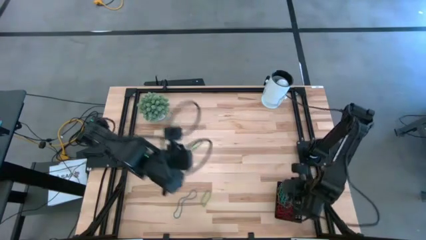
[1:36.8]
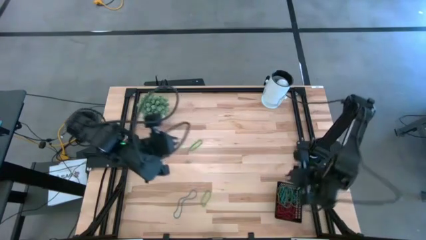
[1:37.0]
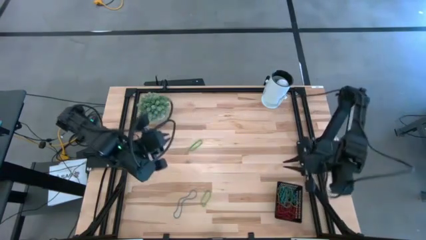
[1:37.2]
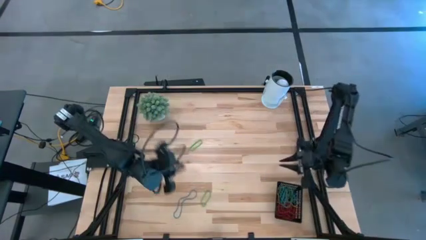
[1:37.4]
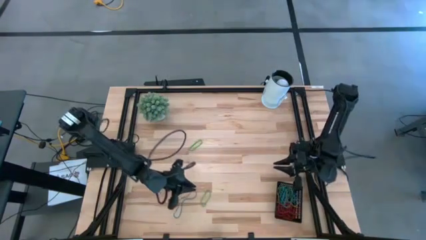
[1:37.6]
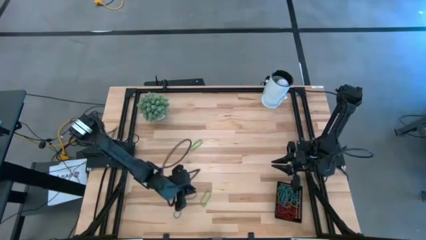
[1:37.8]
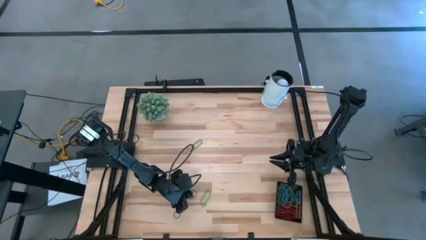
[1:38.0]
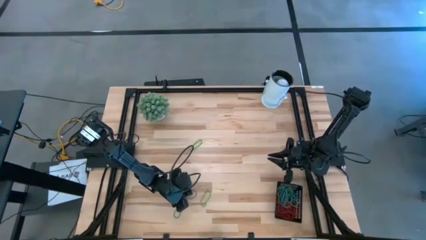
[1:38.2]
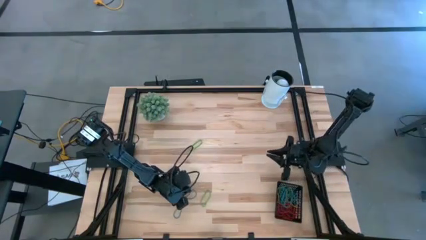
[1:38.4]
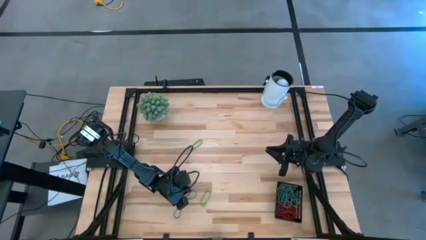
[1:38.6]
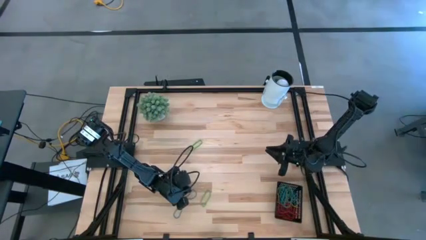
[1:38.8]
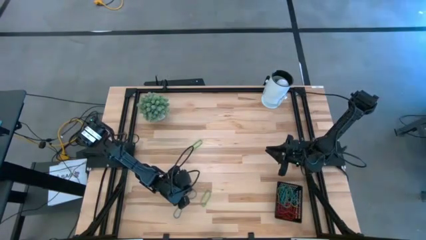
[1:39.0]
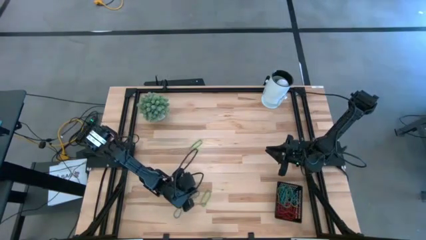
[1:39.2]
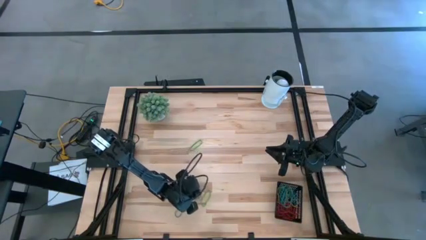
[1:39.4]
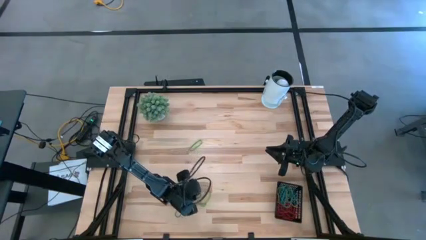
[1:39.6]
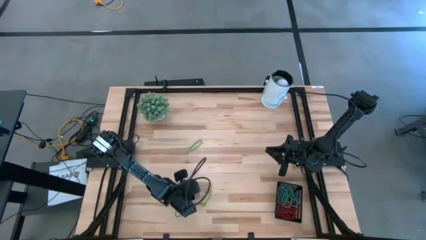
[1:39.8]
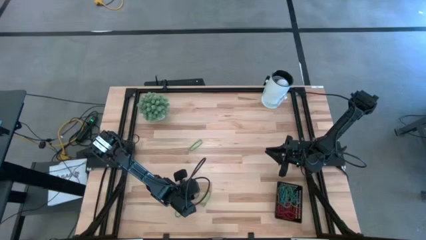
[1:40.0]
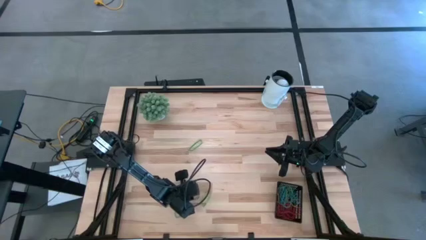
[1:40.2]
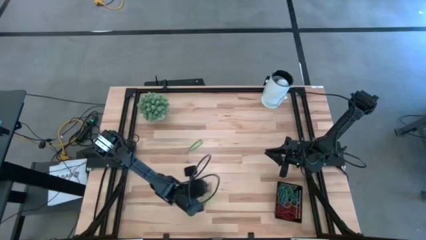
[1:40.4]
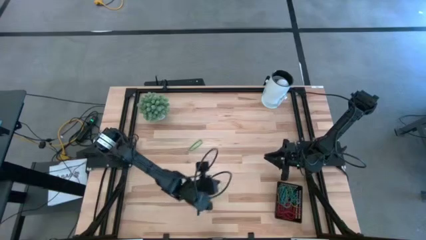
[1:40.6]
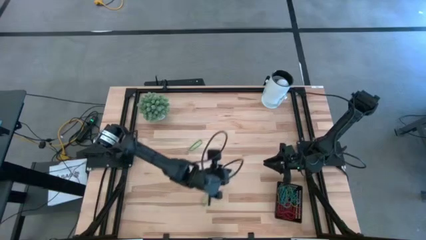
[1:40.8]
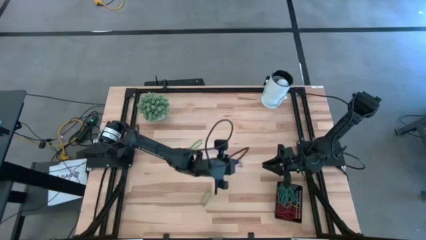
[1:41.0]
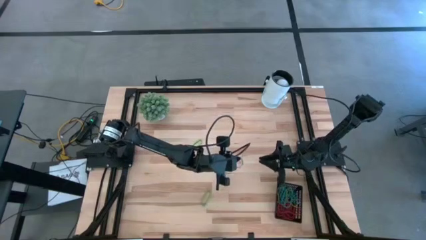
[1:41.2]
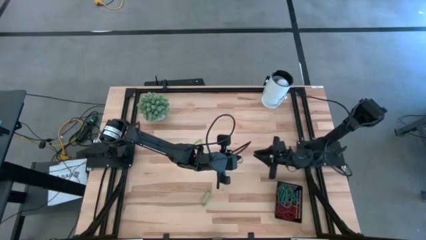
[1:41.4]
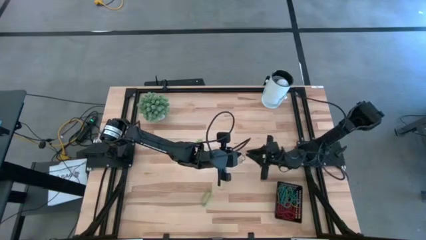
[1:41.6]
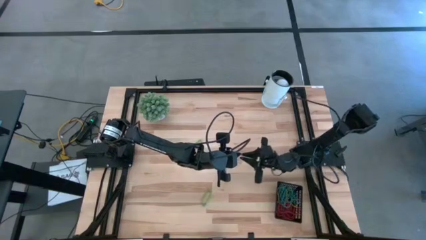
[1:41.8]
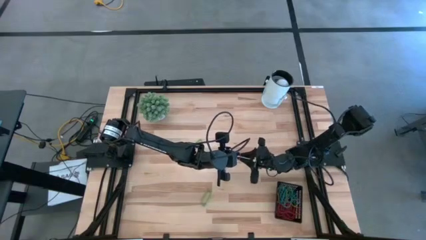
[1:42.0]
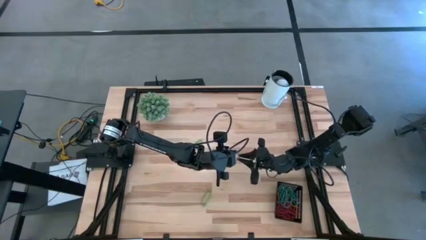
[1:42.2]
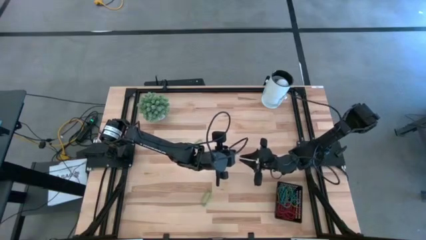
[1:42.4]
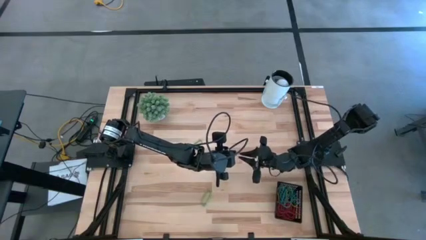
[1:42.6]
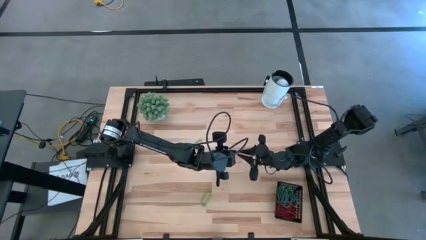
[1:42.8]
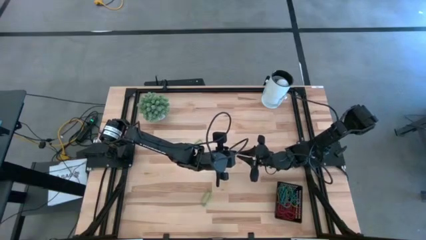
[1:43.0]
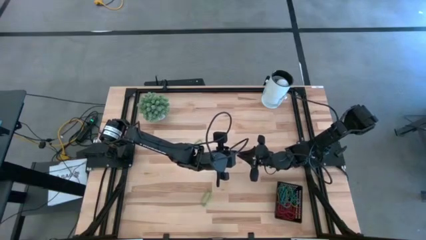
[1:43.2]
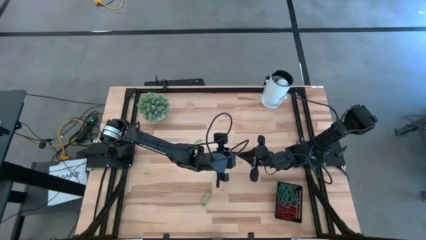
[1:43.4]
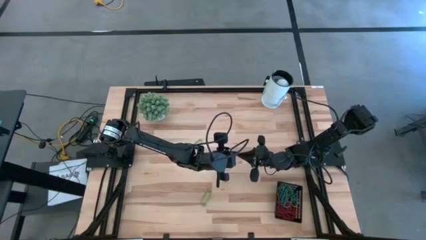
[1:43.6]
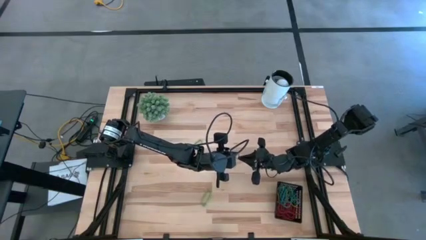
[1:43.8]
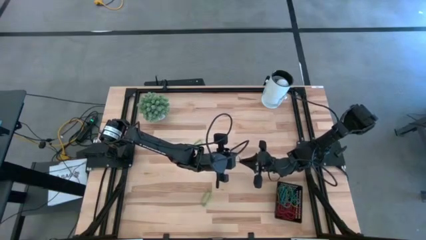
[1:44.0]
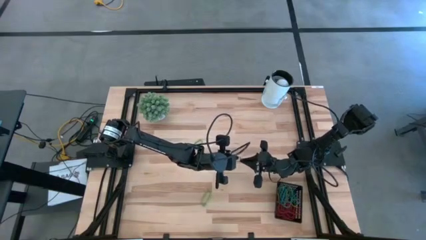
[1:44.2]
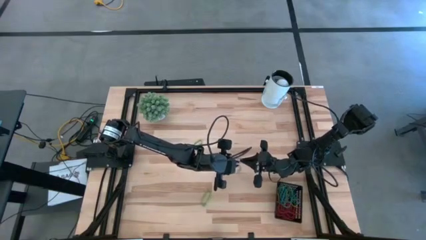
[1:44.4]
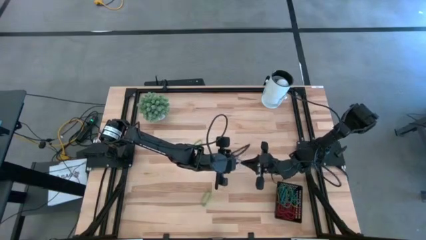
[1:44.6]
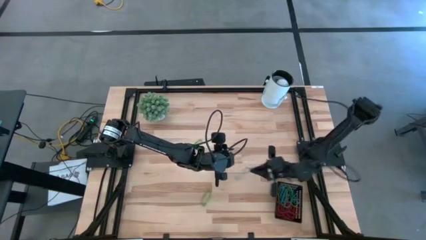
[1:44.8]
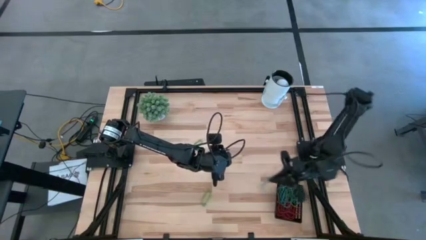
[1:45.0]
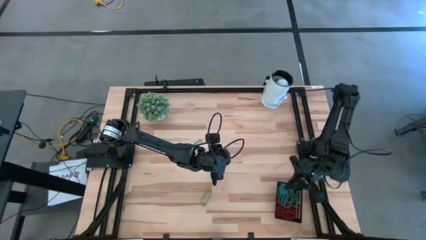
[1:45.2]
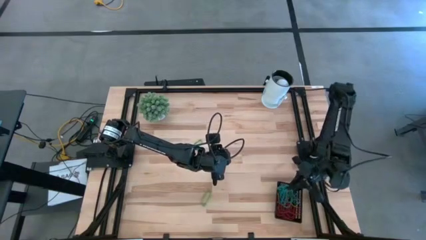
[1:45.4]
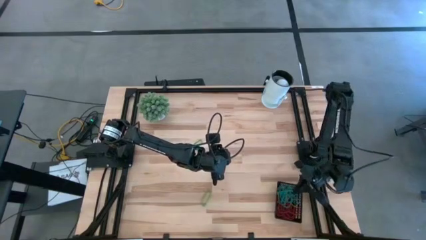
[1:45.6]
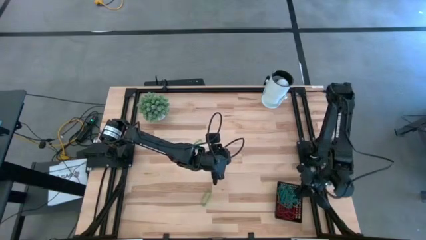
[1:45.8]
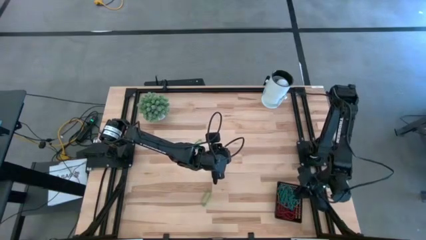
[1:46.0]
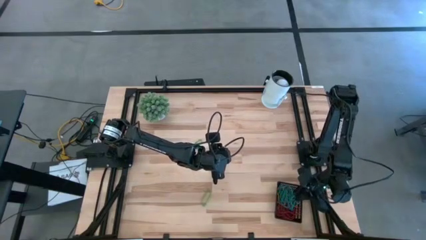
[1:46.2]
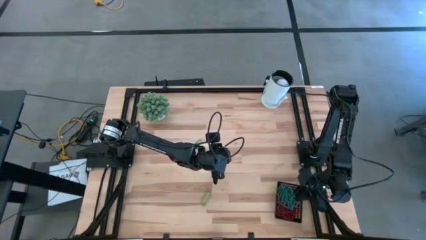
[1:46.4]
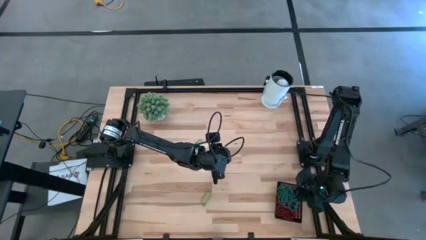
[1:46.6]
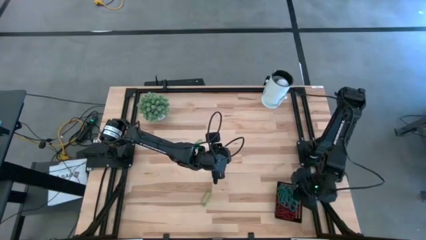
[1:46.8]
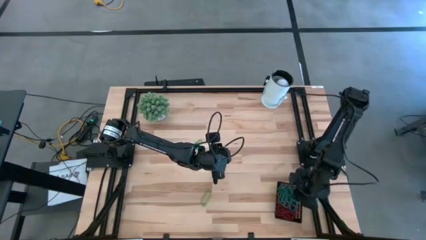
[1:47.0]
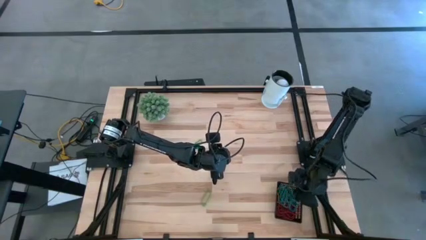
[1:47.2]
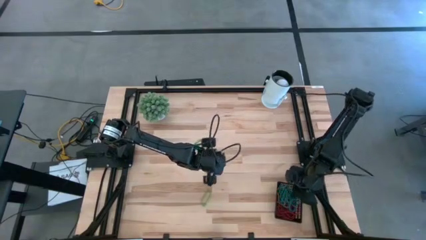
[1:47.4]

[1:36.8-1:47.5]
Task: Pick and place items into bin
Put the blue rubberband into the black basket

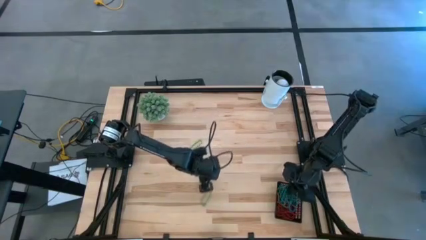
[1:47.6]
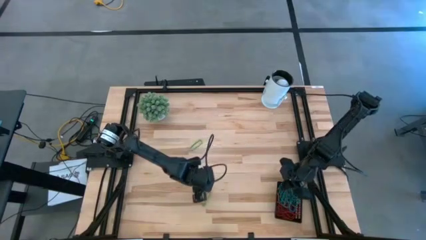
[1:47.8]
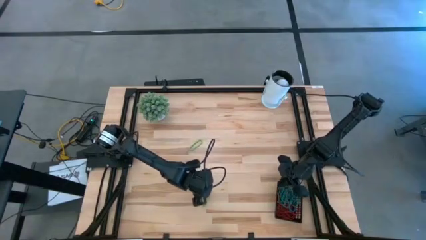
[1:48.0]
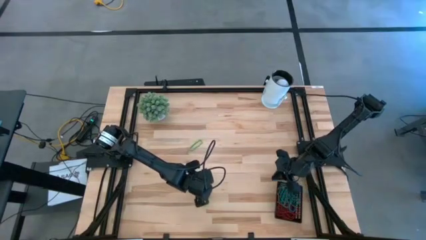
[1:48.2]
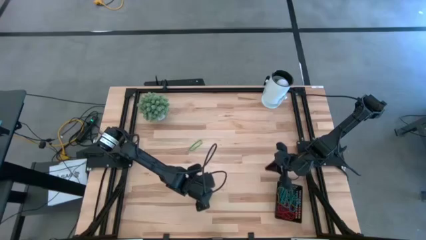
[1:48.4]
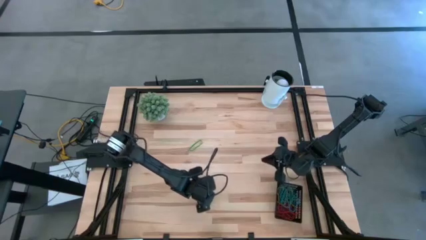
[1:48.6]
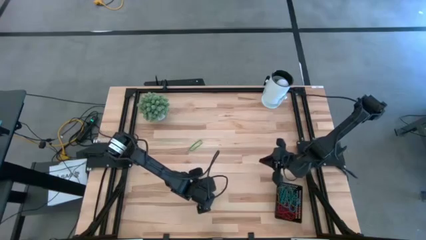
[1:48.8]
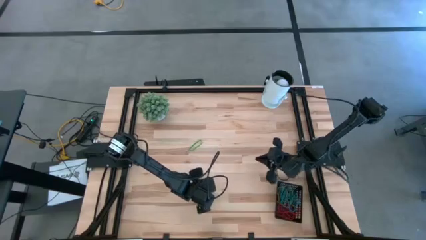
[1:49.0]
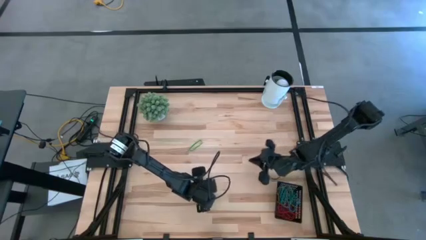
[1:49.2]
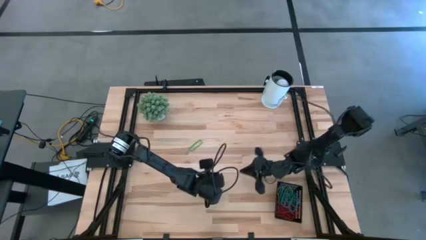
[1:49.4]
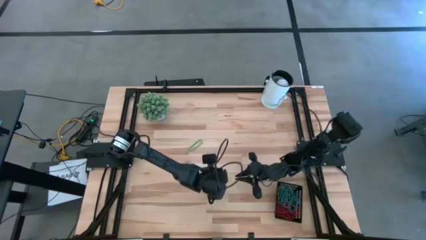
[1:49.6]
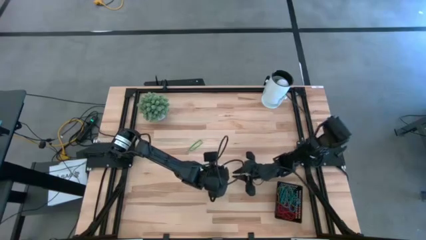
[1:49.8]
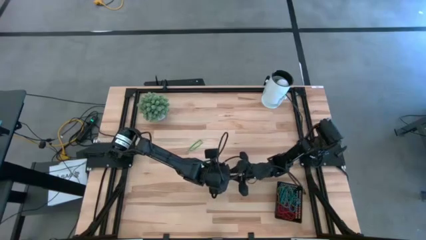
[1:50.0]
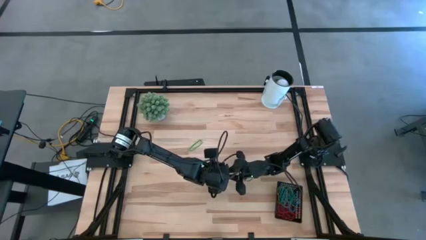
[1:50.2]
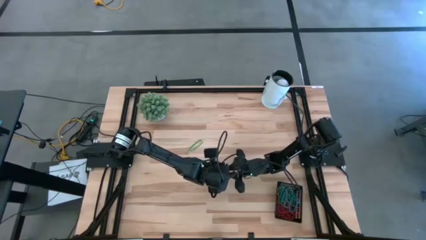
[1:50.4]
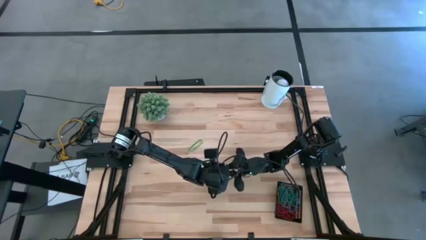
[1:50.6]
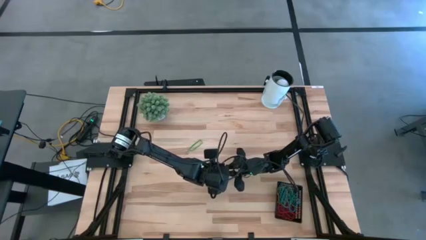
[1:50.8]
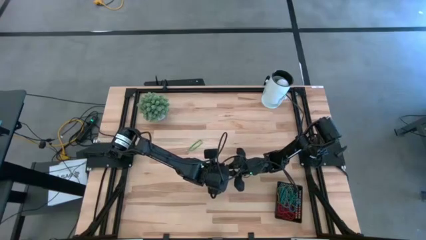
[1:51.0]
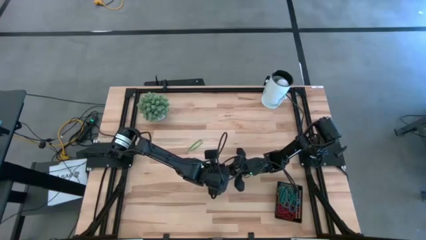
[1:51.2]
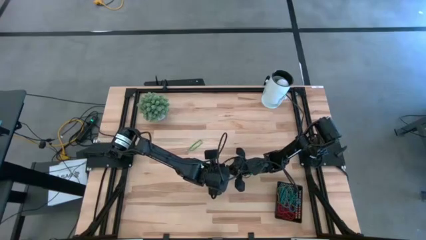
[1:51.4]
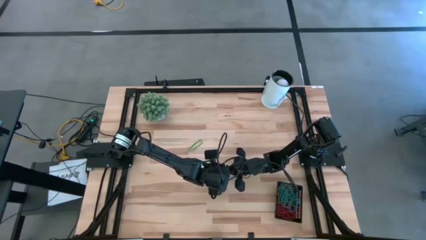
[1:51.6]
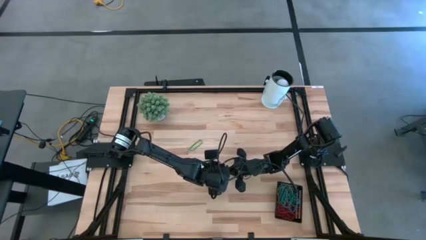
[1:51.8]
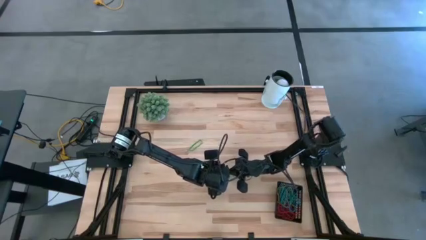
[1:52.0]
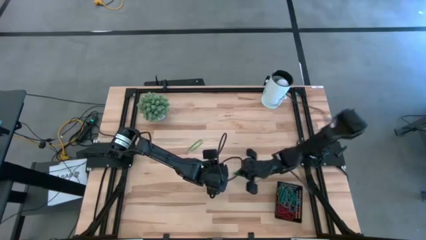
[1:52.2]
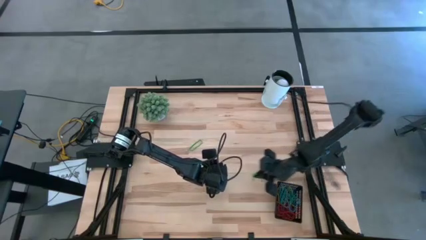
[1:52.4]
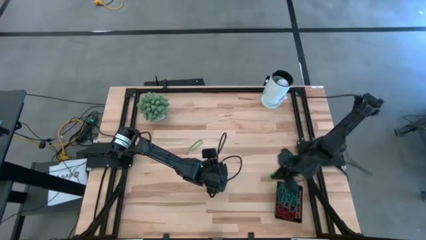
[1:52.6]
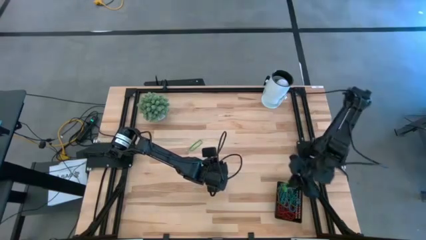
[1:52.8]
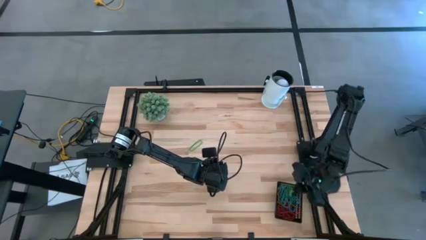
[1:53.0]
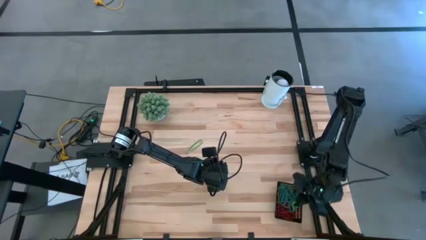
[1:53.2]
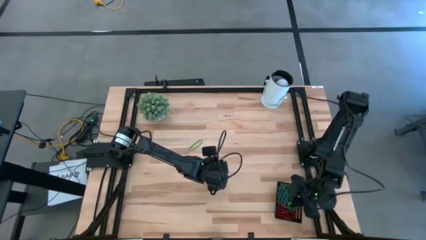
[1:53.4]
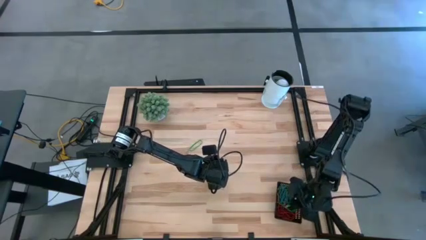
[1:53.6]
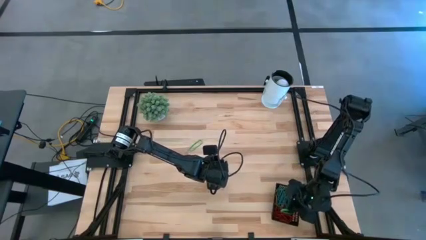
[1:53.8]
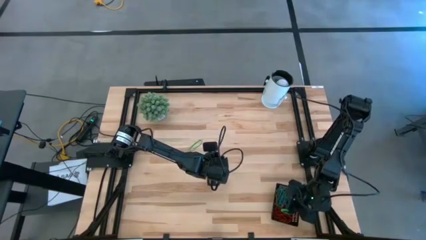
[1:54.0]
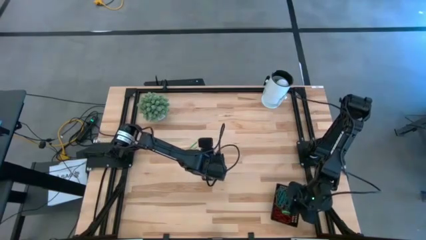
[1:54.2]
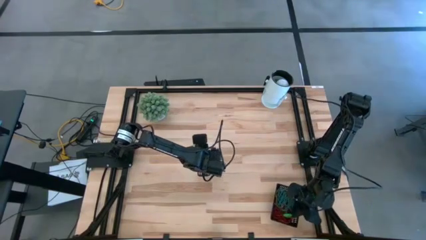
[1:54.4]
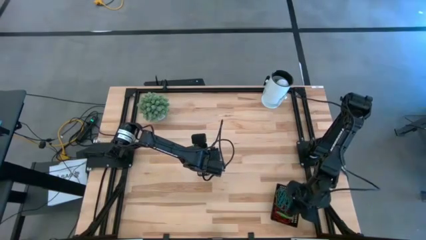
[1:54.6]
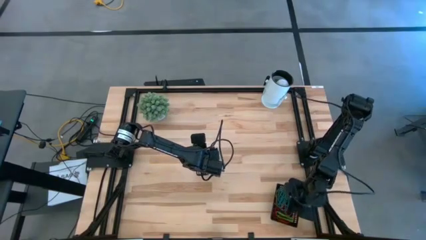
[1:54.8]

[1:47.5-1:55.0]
Put the bottom green rubberband into the black basket
